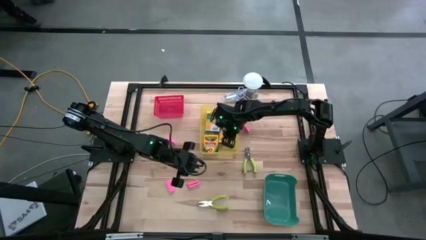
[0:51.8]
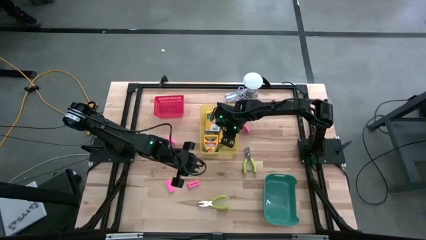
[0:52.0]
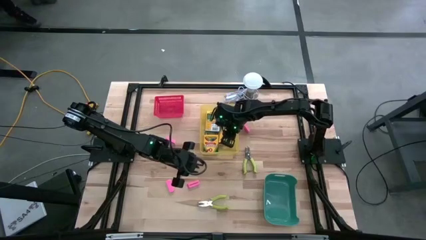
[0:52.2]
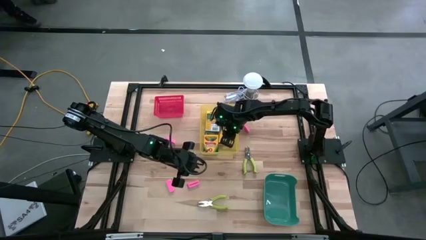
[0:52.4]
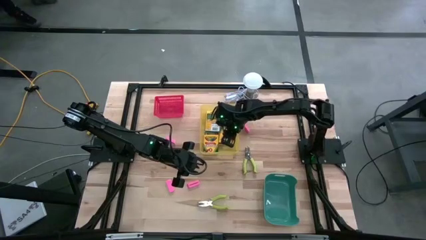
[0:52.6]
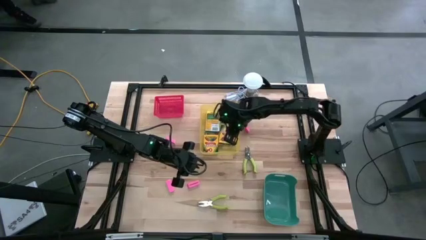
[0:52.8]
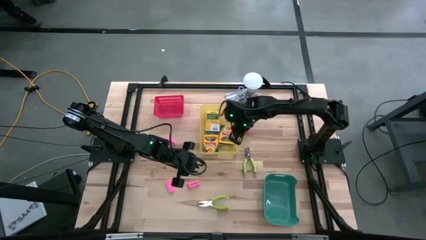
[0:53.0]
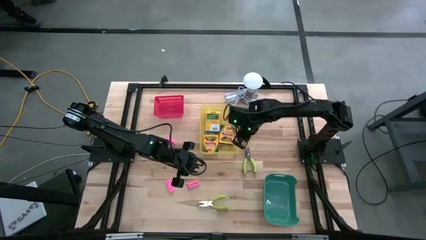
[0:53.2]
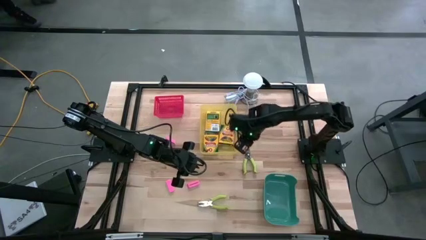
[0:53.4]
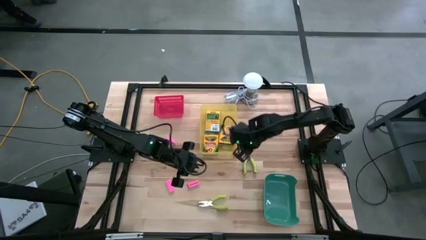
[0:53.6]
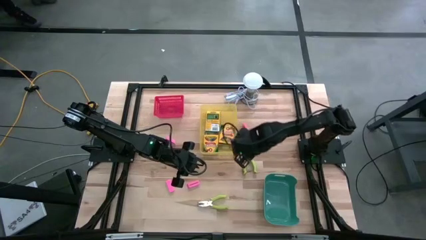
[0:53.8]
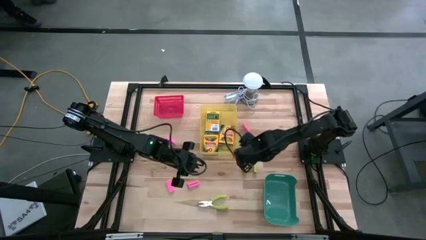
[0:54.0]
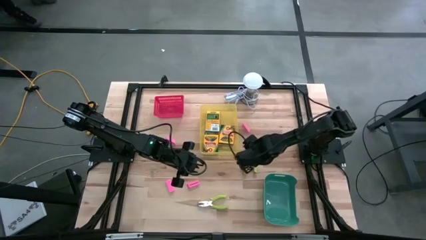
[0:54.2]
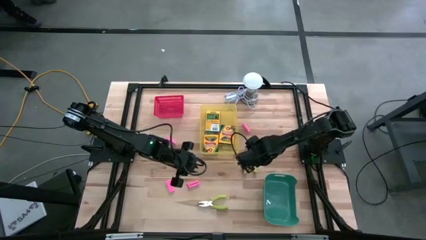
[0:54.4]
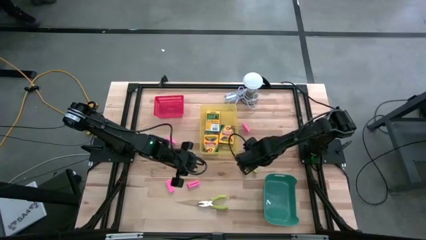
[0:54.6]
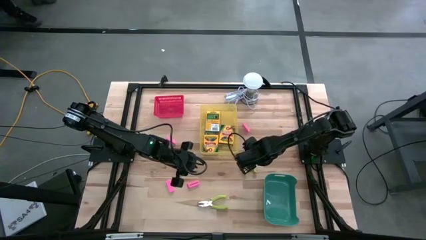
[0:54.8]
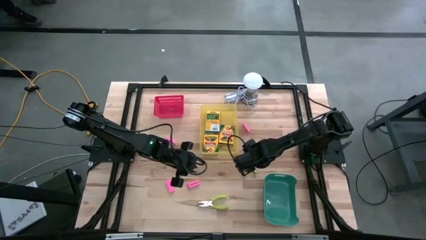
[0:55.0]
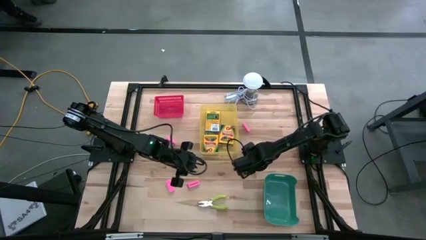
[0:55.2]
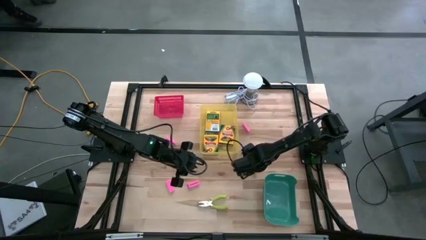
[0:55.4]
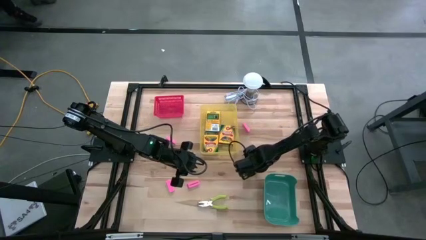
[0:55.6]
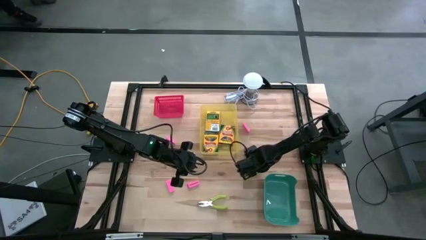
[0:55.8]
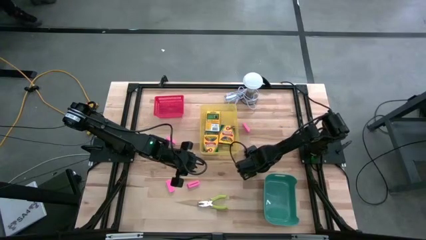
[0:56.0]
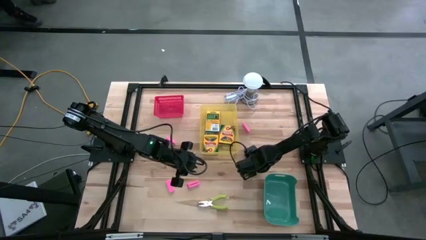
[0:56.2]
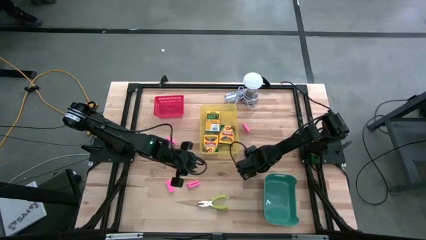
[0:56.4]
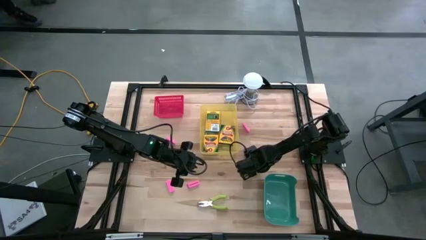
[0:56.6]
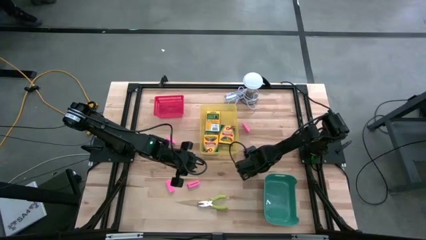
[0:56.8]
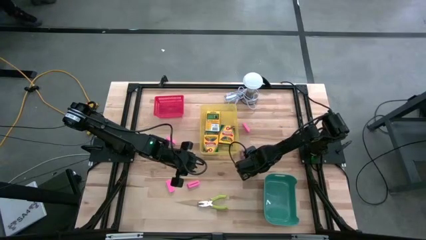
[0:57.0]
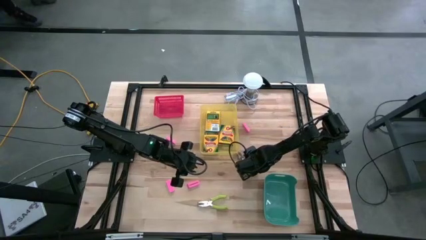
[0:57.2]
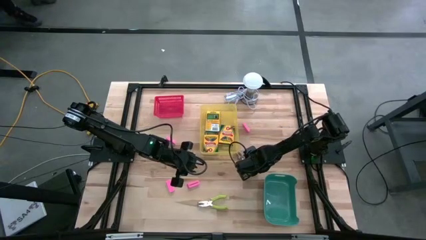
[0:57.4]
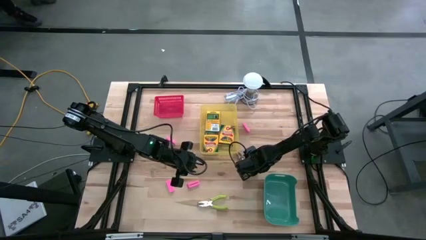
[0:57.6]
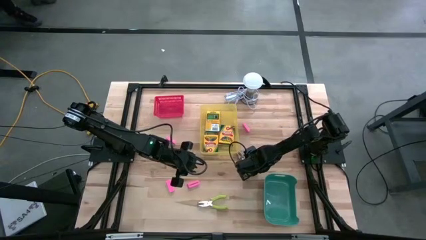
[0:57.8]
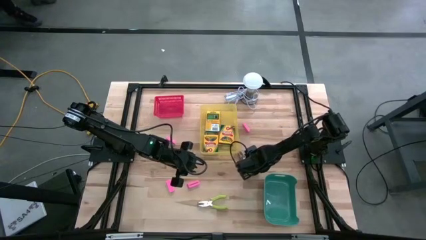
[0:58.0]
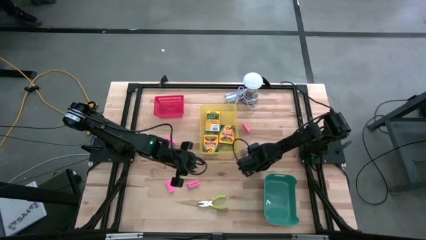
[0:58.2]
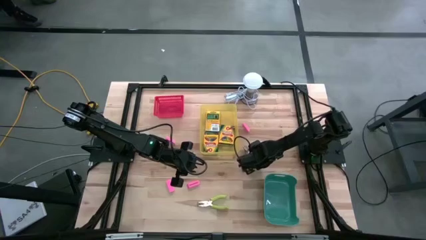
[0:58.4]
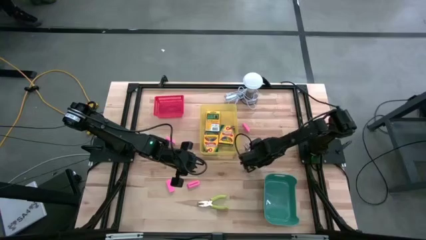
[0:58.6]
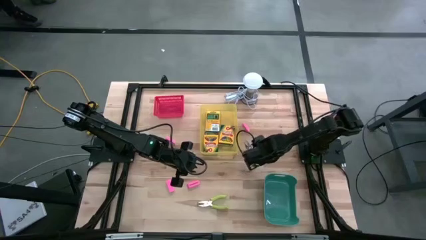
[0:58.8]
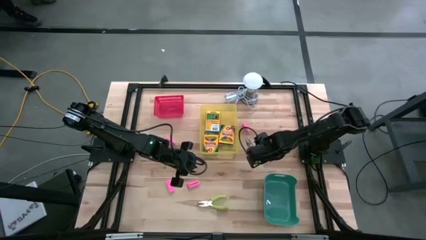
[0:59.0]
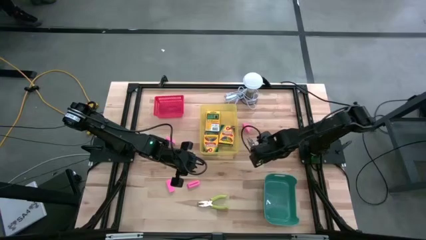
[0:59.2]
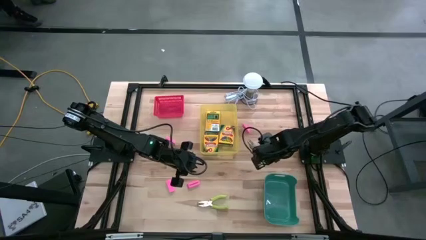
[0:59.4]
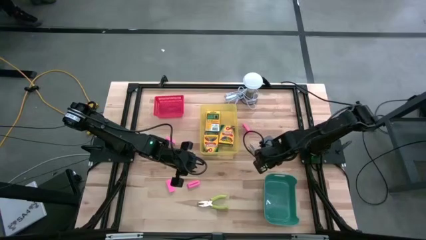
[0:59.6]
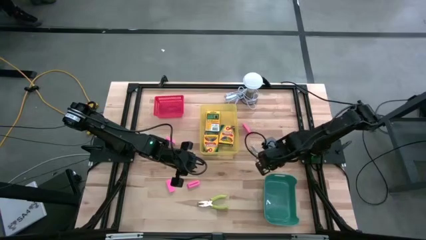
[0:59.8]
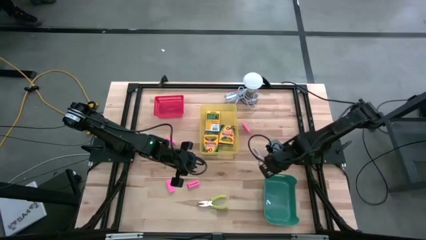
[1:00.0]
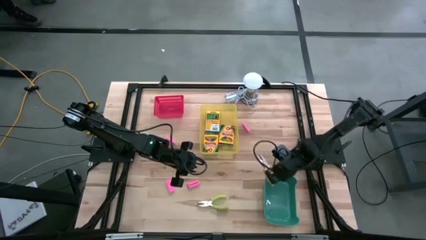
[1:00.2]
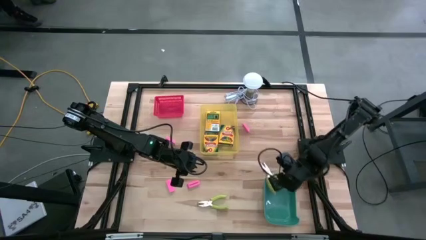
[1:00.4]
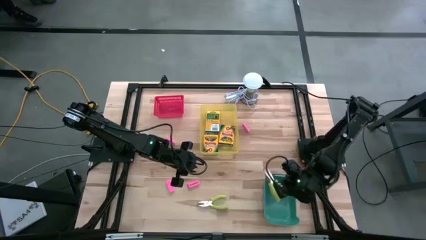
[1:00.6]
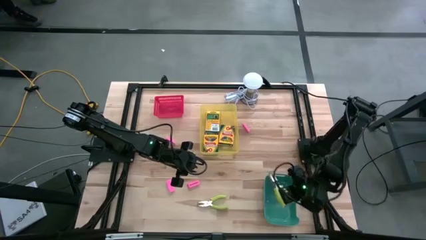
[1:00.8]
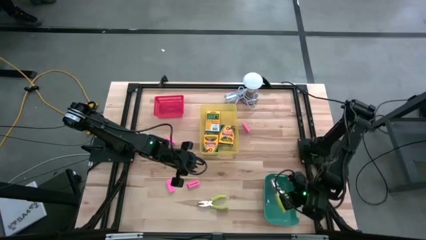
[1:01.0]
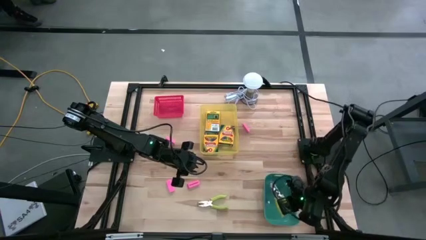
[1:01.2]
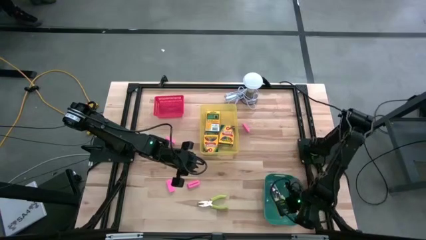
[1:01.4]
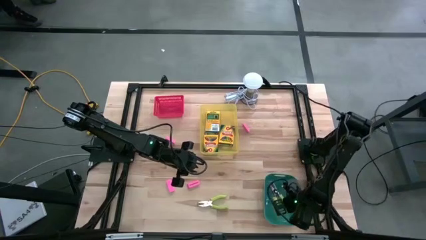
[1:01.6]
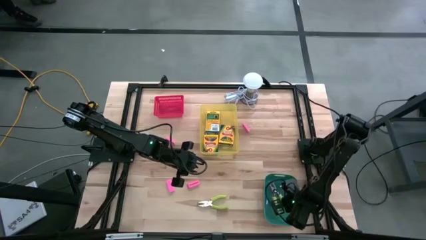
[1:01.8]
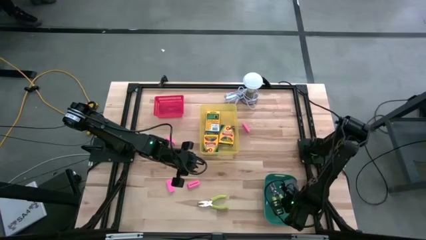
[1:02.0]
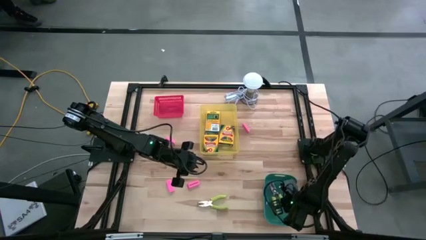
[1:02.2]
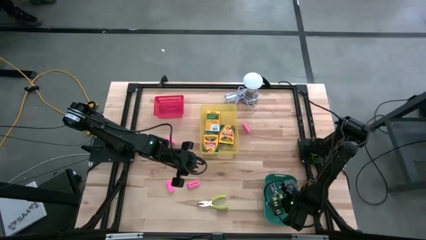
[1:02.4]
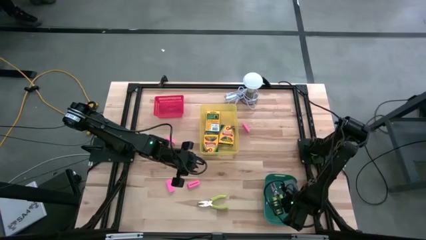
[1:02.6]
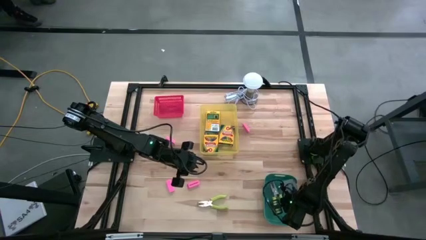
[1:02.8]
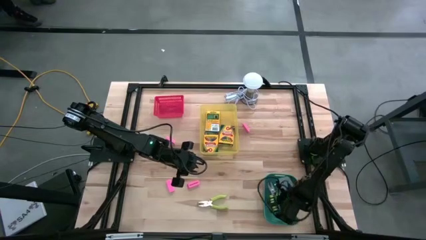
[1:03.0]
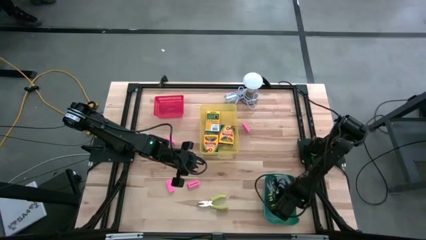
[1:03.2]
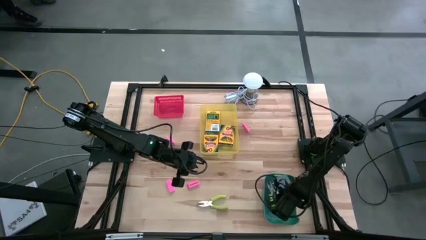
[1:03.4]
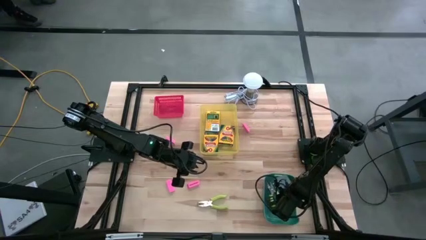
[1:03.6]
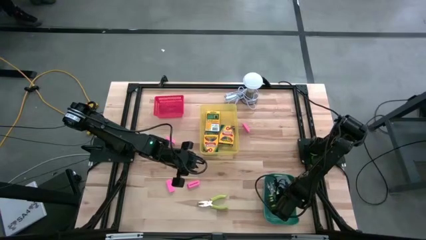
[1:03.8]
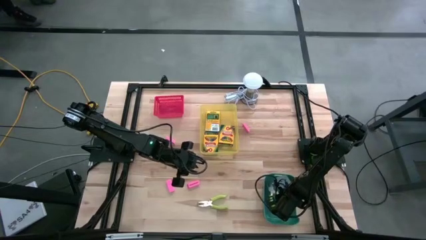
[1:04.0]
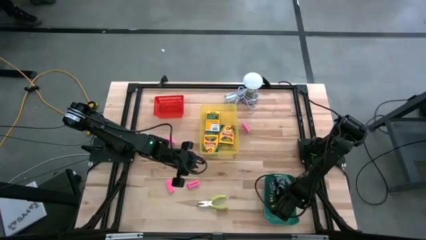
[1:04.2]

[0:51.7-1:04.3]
Task: Pick & Place School Supplies
Put the light green pliers into the blue bin

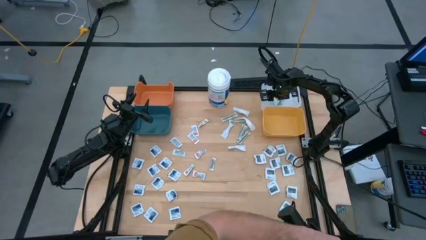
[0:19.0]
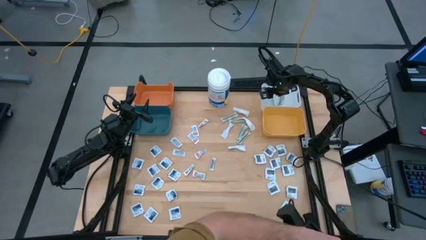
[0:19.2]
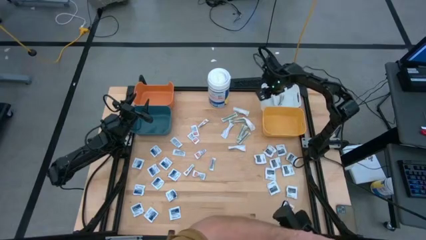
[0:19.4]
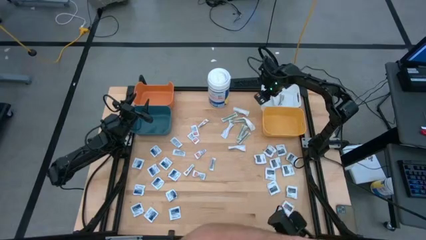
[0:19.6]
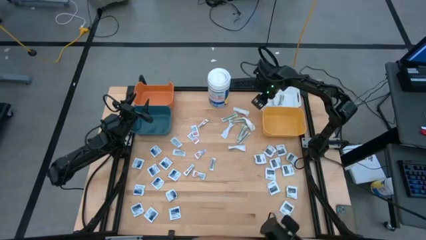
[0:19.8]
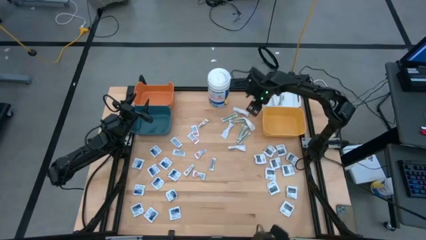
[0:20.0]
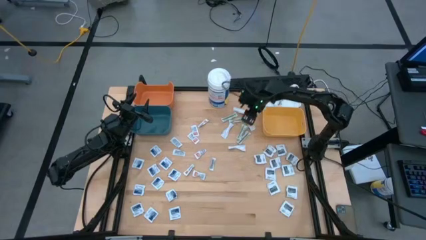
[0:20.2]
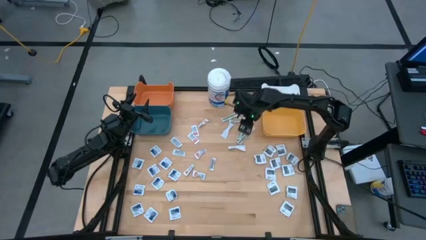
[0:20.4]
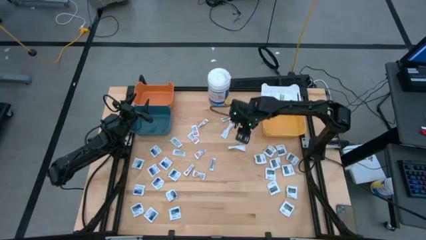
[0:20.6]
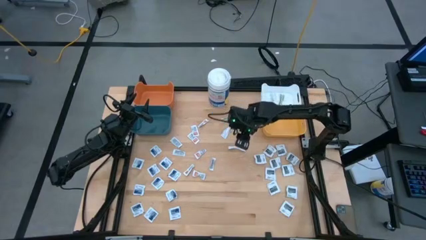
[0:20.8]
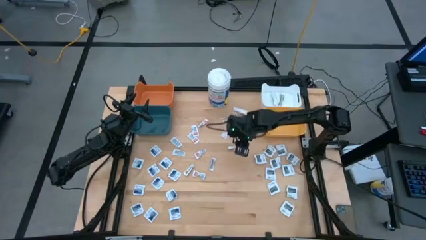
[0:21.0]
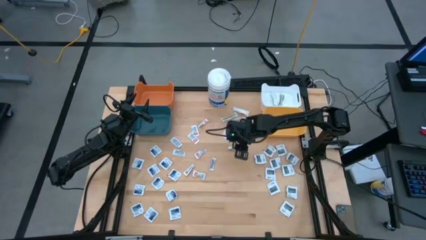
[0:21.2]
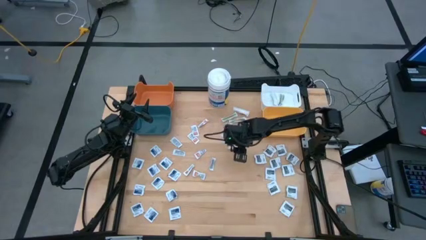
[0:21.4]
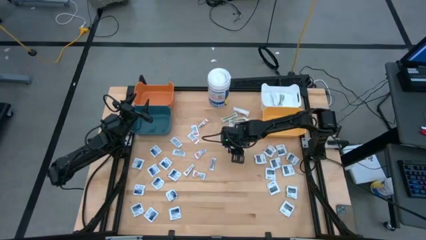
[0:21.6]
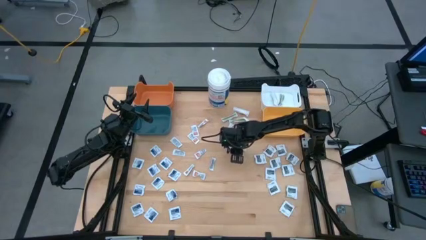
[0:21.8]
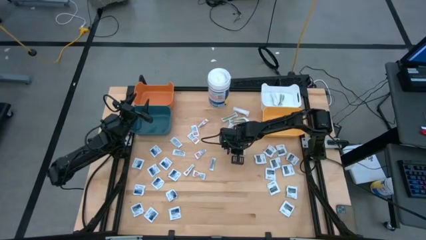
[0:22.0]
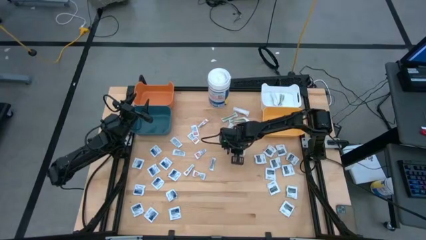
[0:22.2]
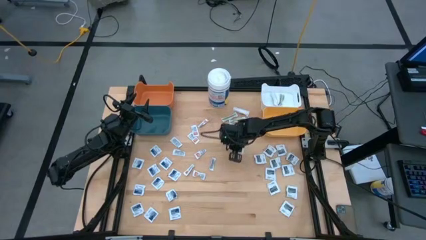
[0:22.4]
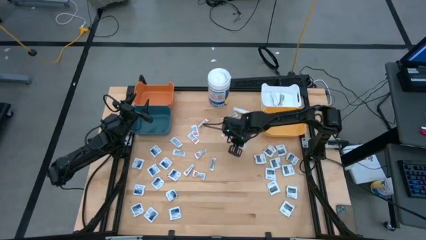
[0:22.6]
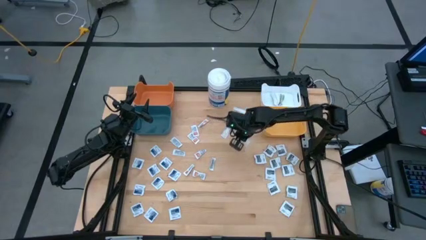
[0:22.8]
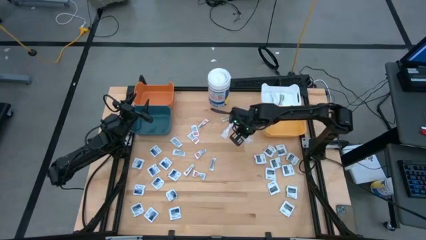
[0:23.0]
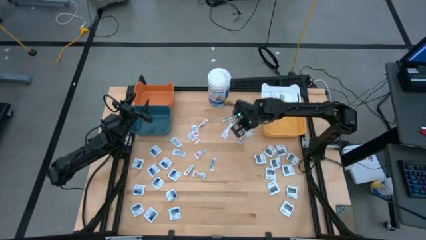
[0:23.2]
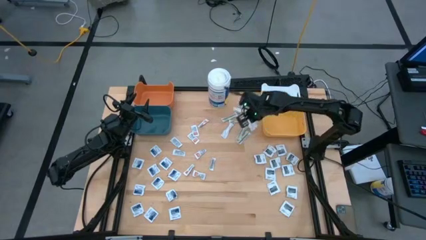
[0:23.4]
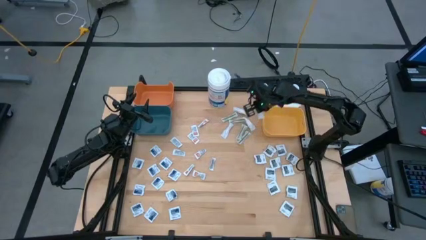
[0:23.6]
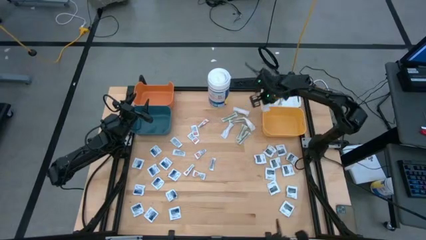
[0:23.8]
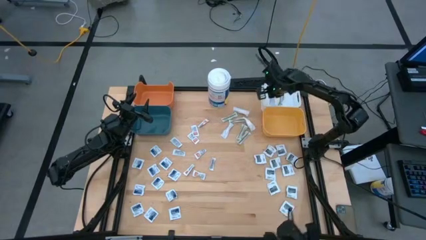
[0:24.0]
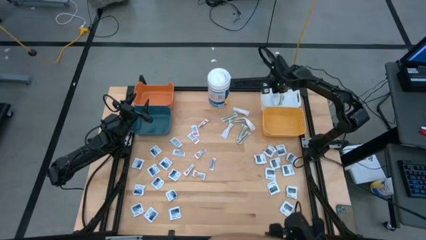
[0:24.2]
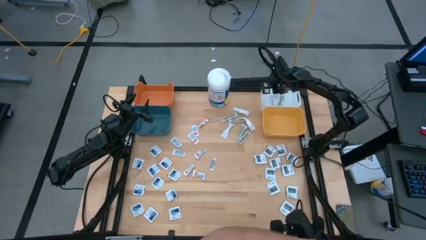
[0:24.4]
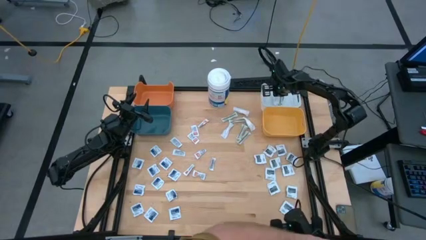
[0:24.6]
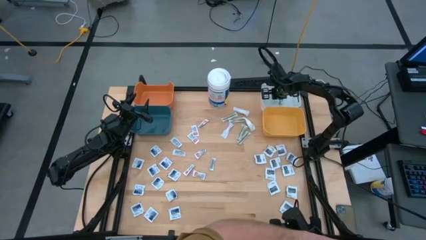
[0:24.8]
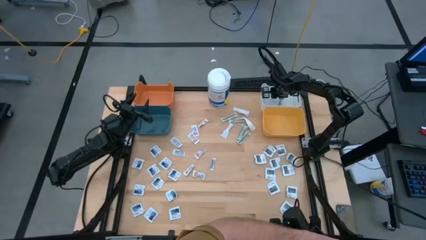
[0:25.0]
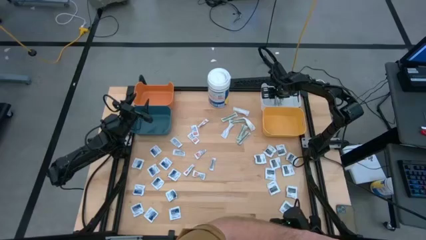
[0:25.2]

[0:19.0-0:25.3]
Task: Pick & Place First Aid Supplies
Put the green bandage into the white bin
